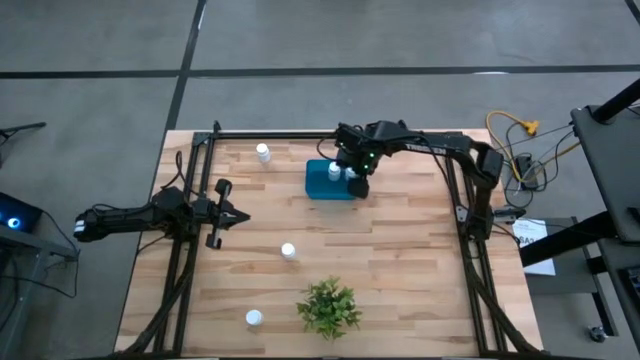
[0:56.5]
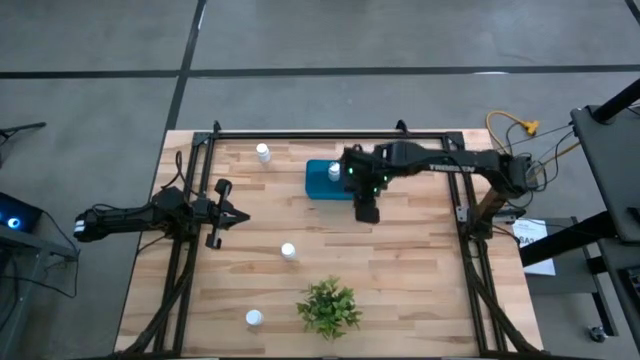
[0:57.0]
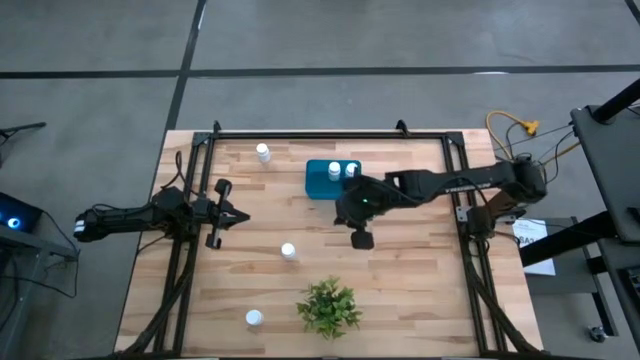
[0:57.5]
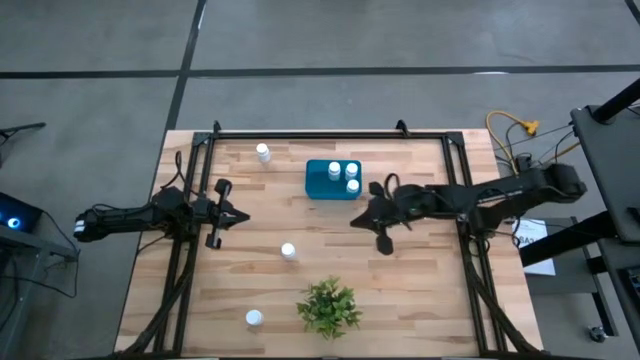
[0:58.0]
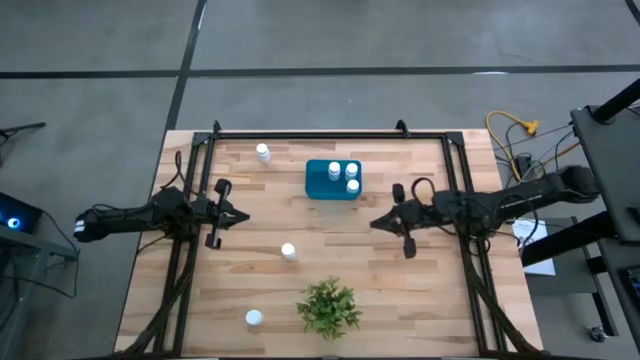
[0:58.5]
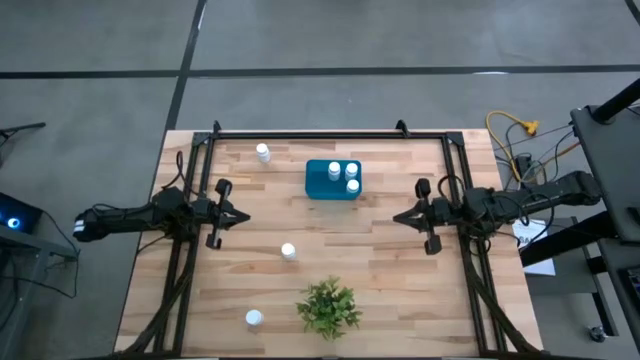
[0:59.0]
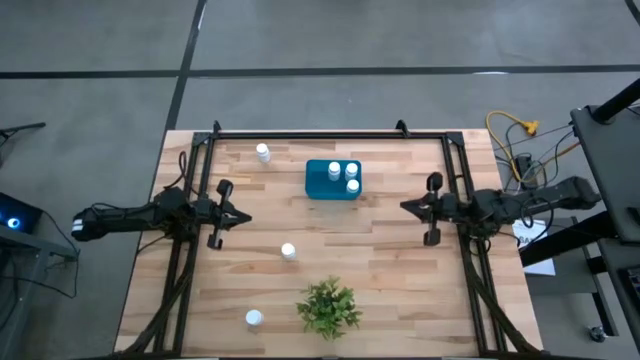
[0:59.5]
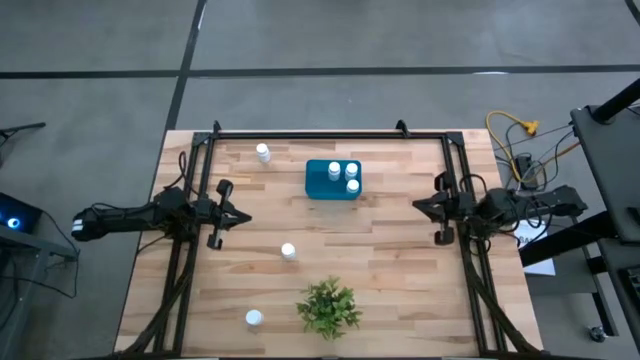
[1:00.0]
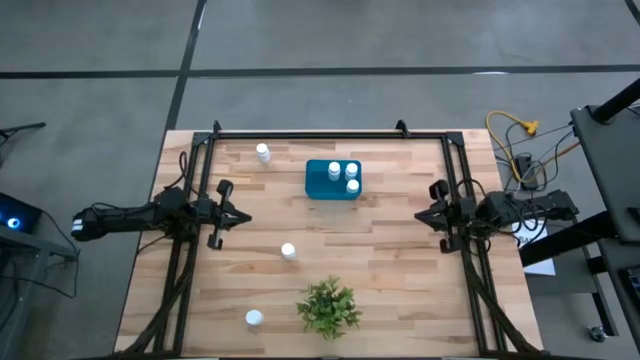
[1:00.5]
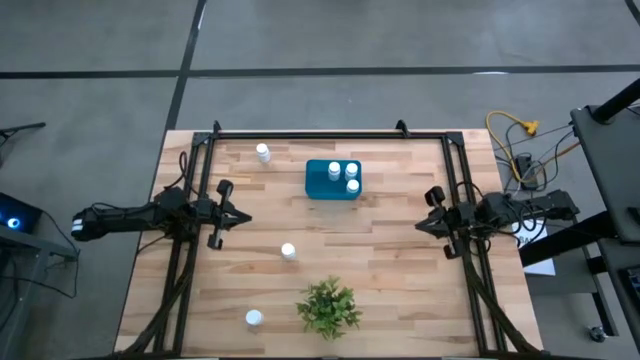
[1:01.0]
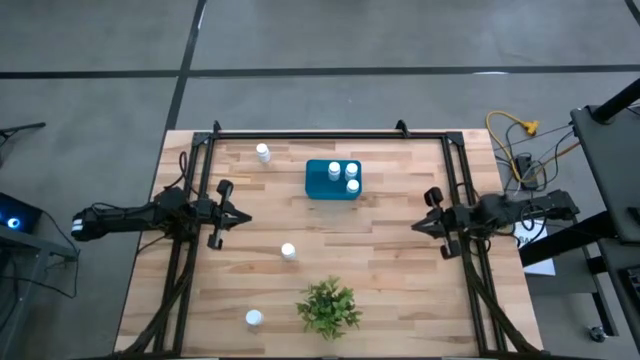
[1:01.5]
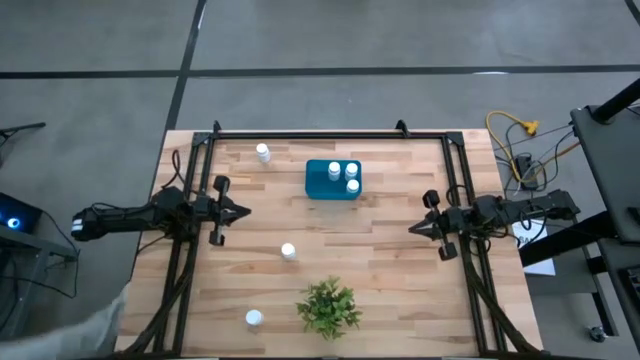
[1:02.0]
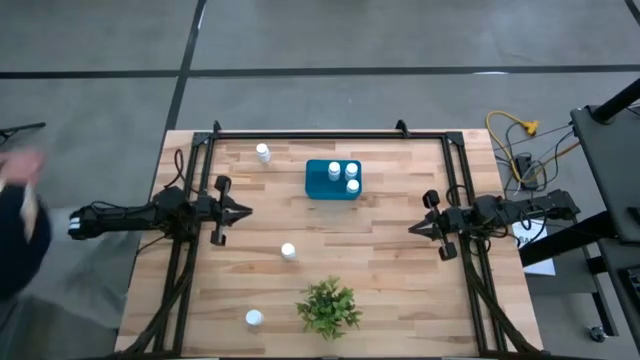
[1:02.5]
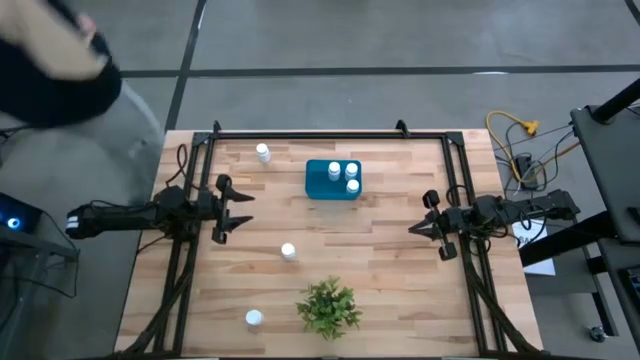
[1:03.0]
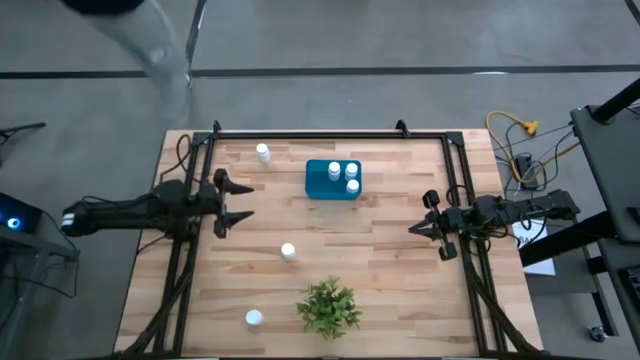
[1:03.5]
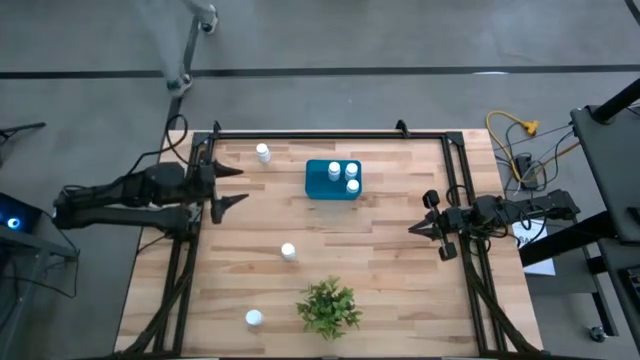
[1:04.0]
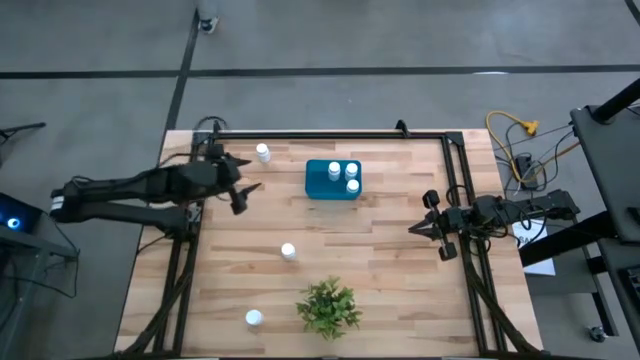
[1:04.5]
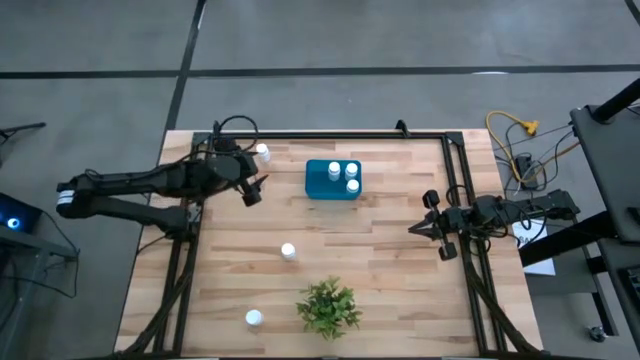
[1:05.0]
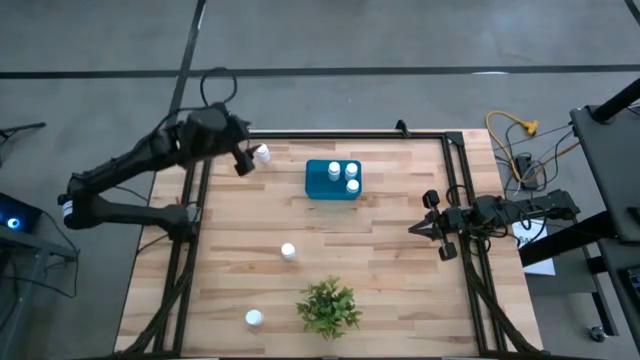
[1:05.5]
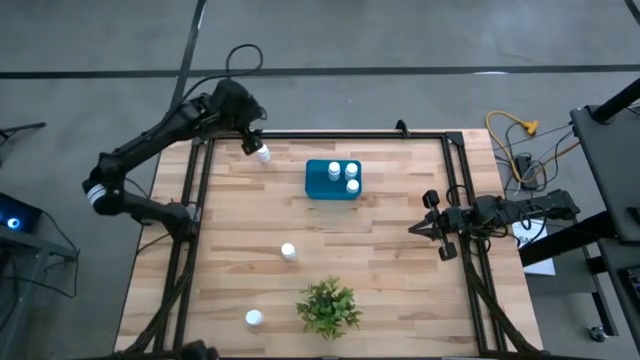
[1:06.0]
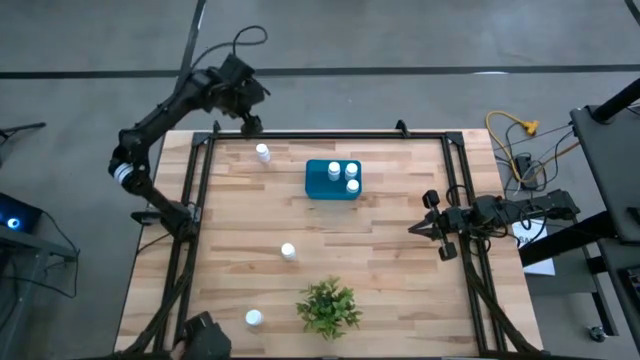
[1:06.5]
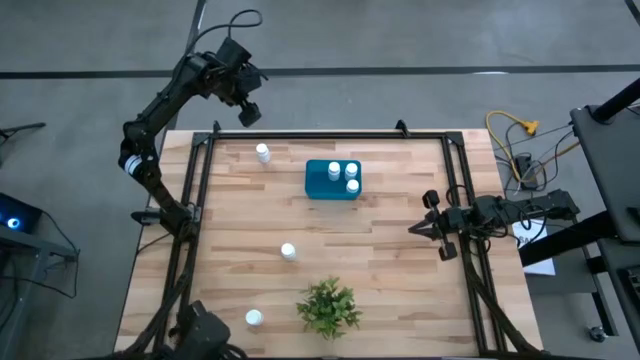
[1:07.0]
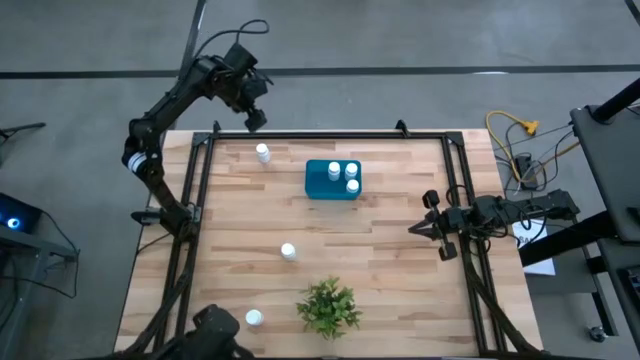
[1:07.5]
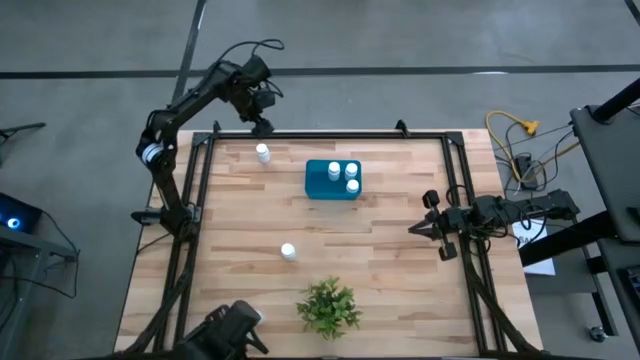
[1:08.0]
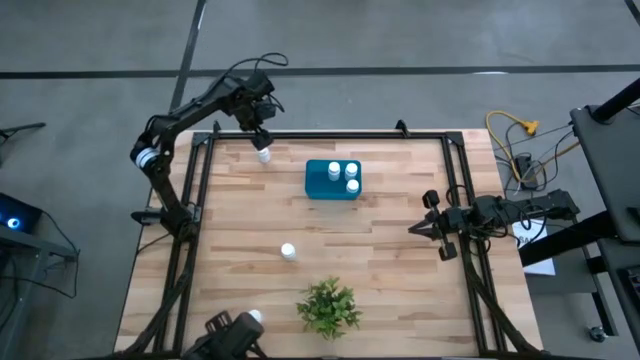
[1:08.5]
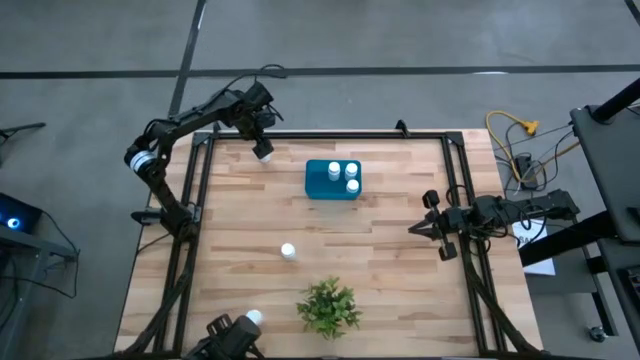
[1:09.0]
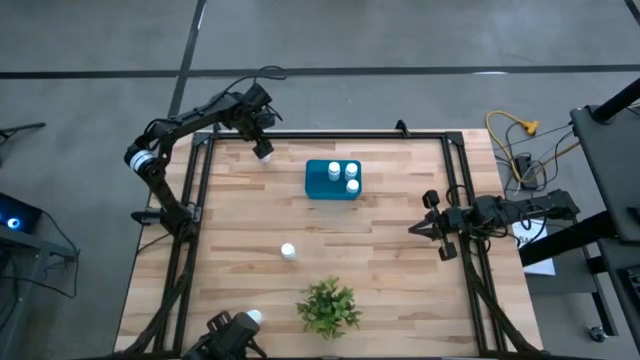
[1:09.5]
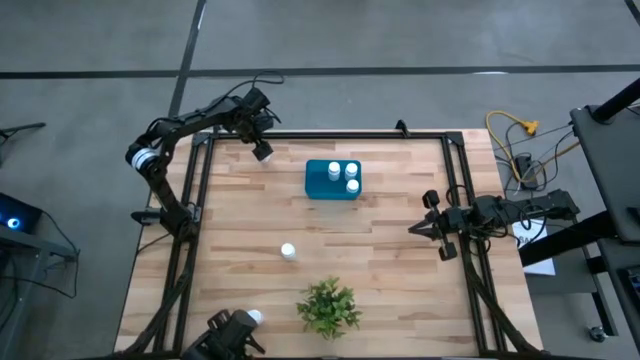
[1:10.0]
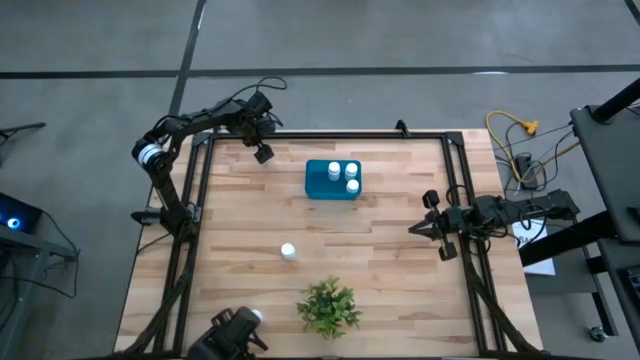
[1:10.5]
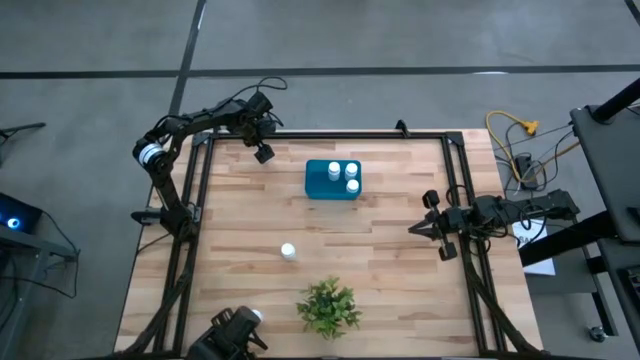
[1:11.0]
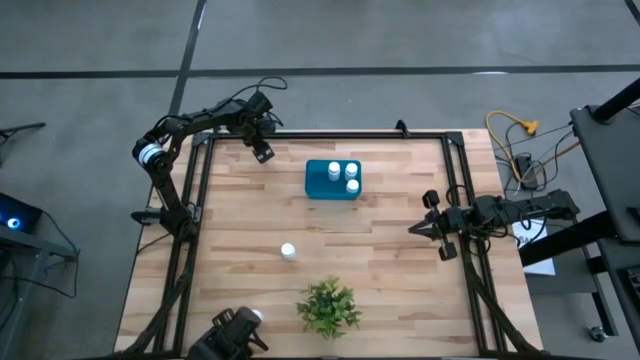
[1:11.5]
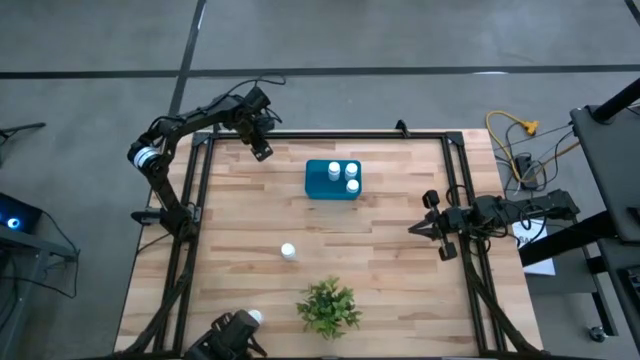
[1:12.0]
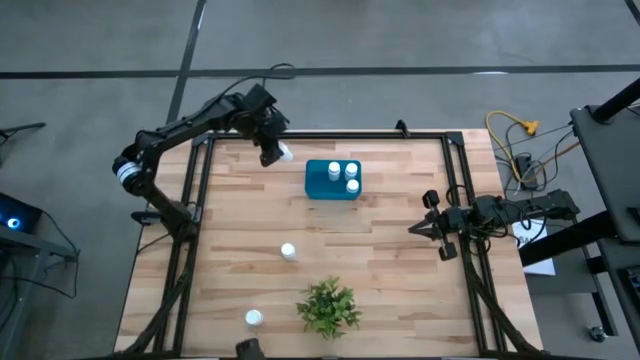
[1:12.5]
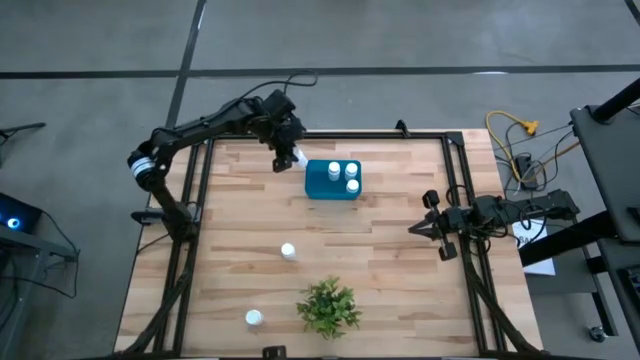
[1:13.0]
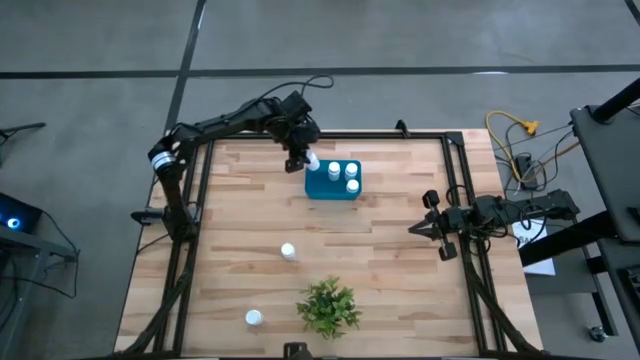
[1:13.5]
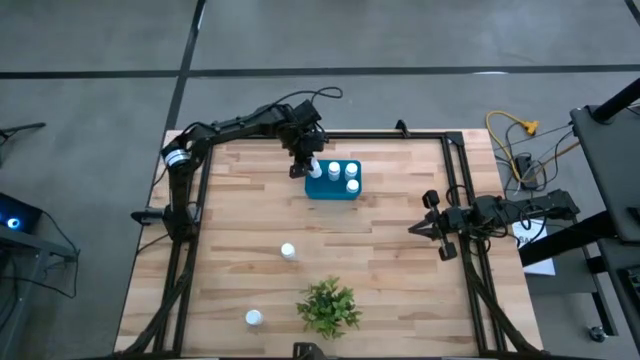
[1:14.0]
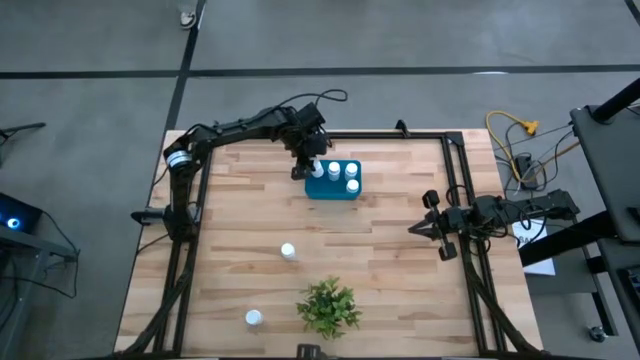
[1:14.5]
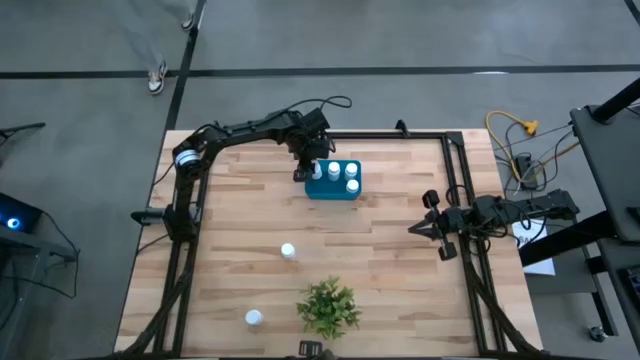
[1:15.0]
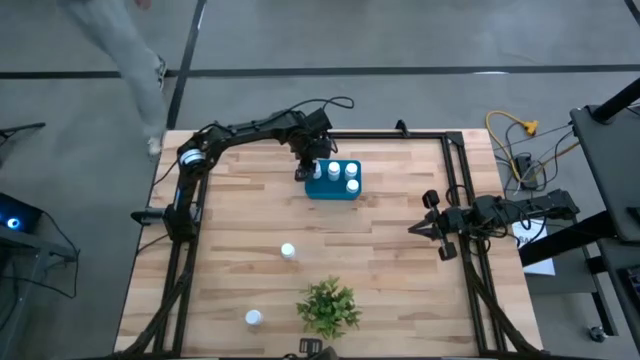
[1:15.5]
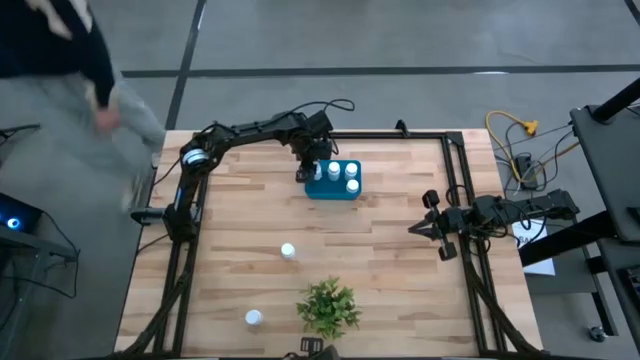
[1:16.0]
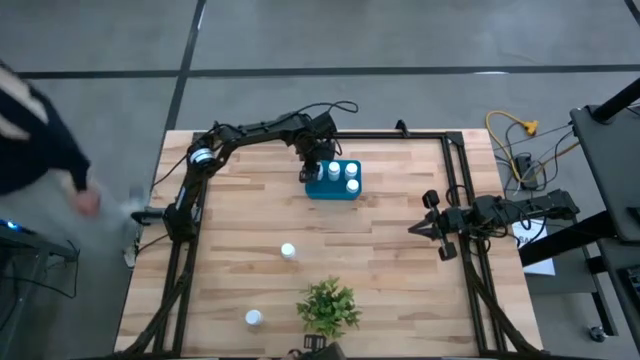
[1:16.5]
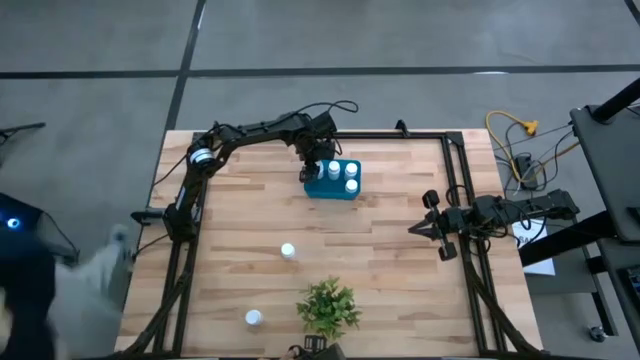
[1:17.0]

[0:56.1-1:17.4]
Task: Pick and place pill bottles into a basket
Put the white pill bottle into the blue bin
